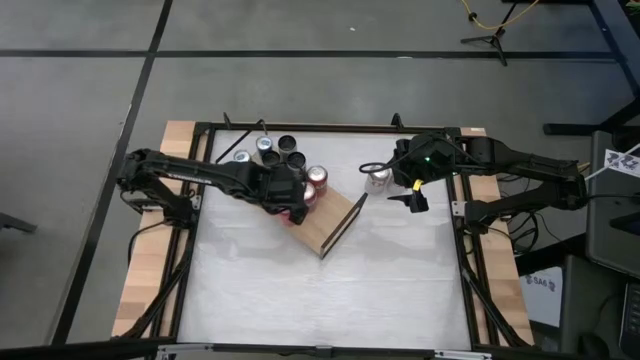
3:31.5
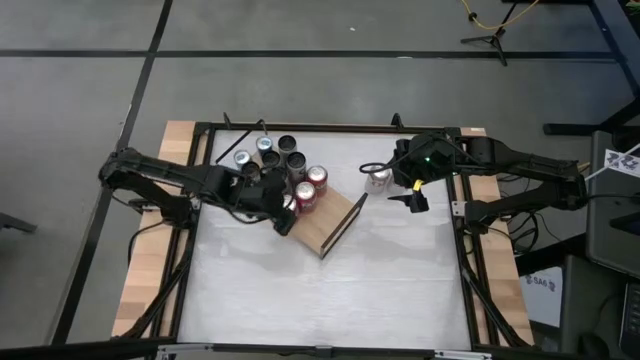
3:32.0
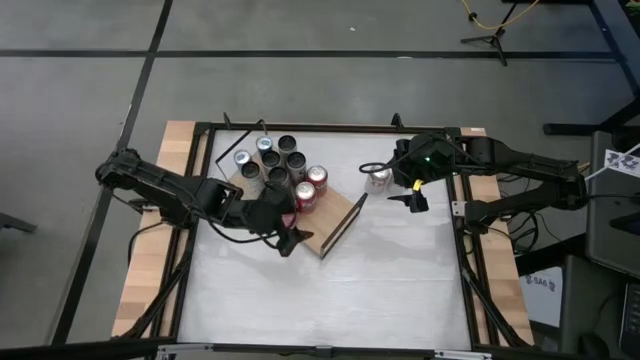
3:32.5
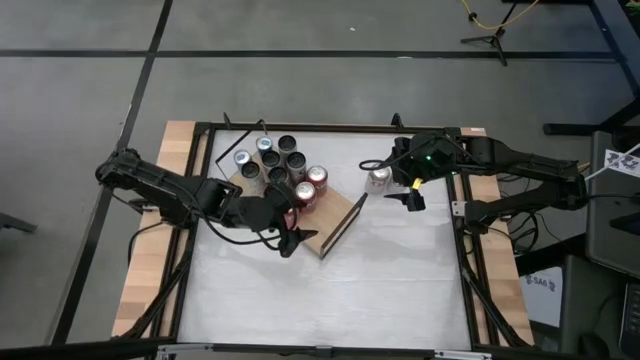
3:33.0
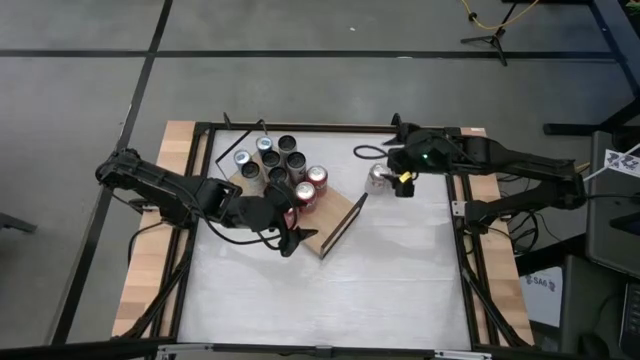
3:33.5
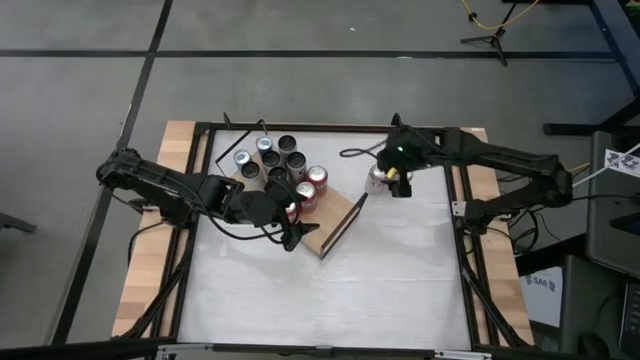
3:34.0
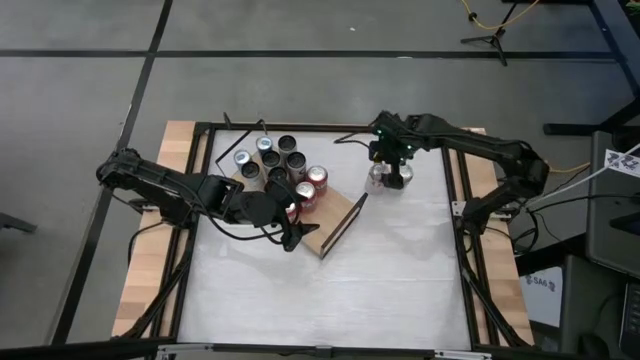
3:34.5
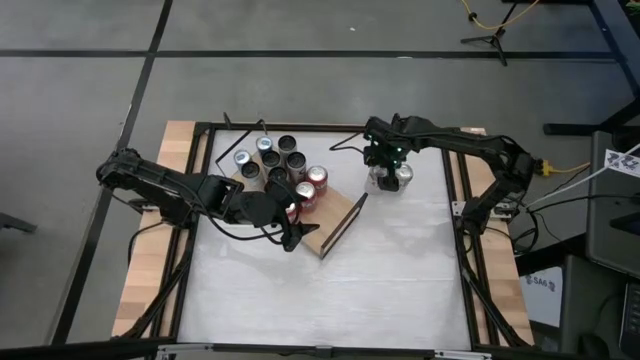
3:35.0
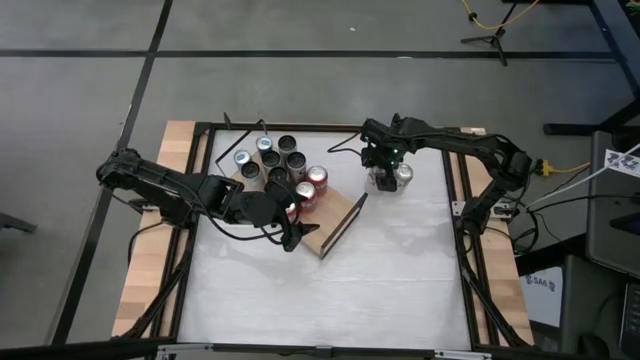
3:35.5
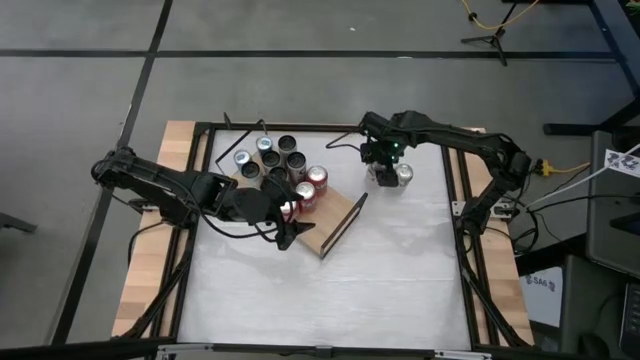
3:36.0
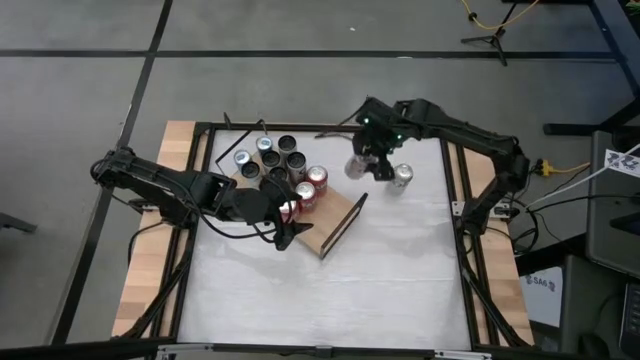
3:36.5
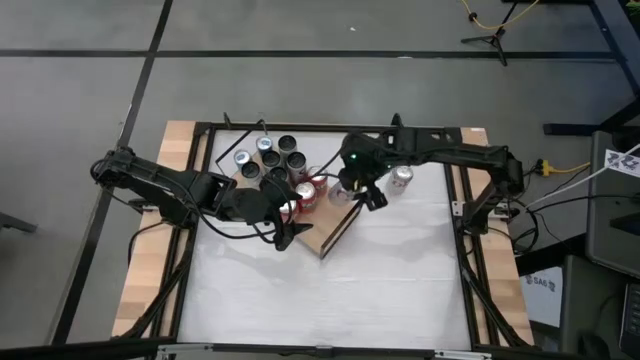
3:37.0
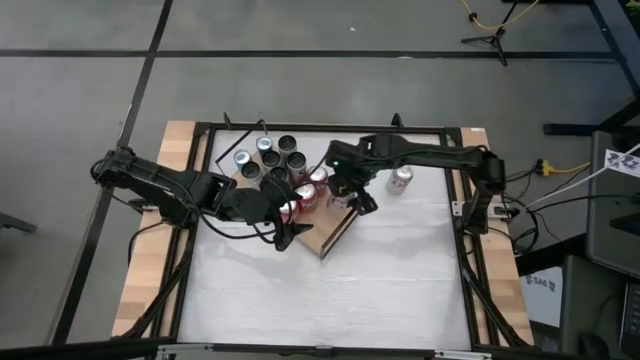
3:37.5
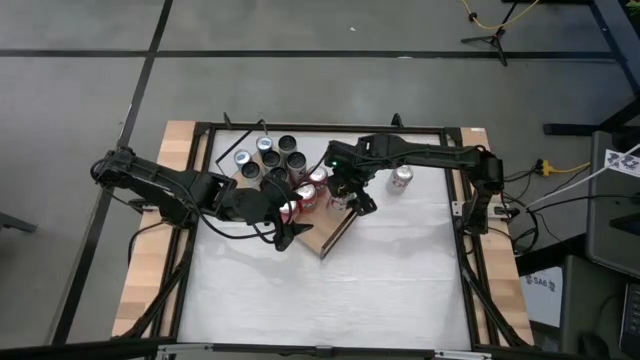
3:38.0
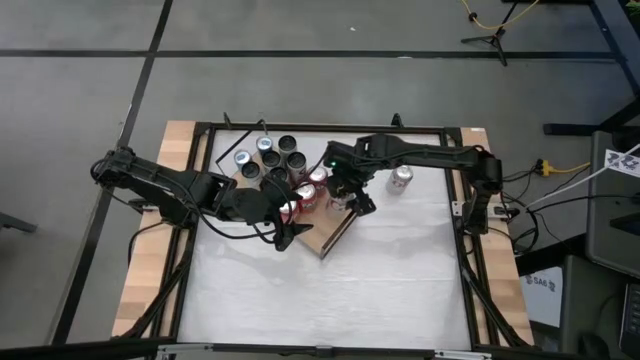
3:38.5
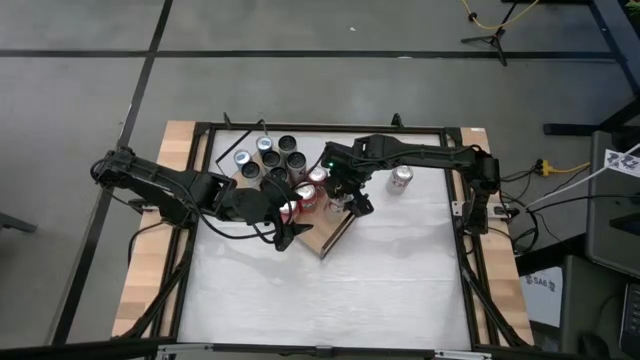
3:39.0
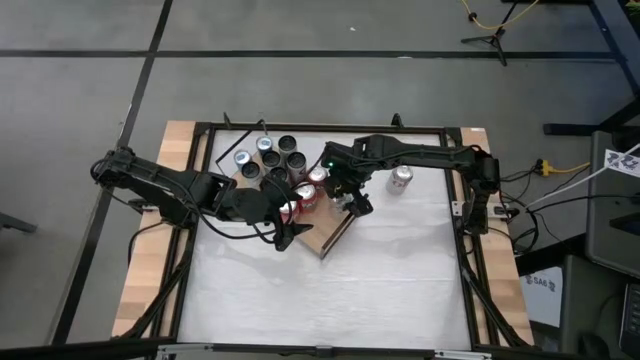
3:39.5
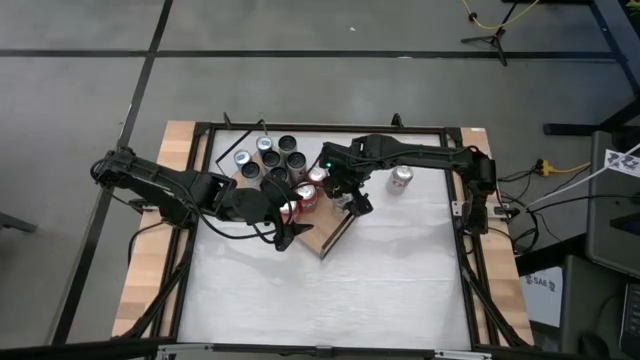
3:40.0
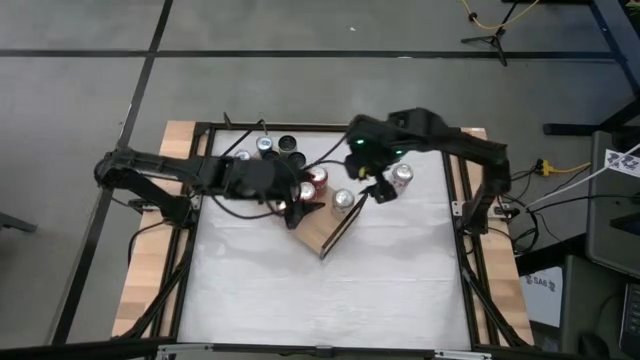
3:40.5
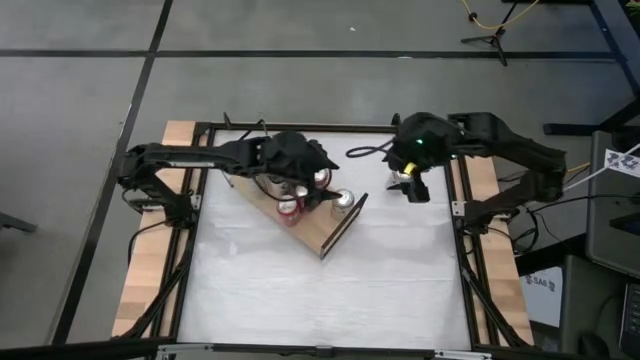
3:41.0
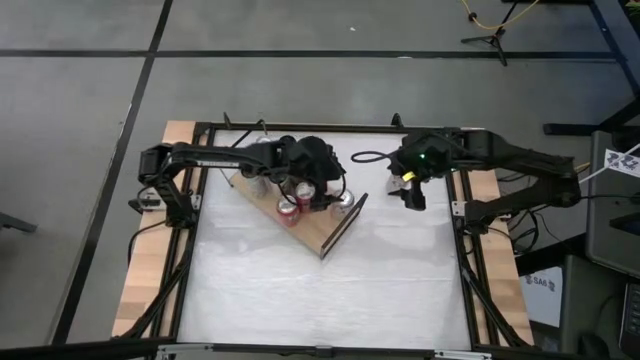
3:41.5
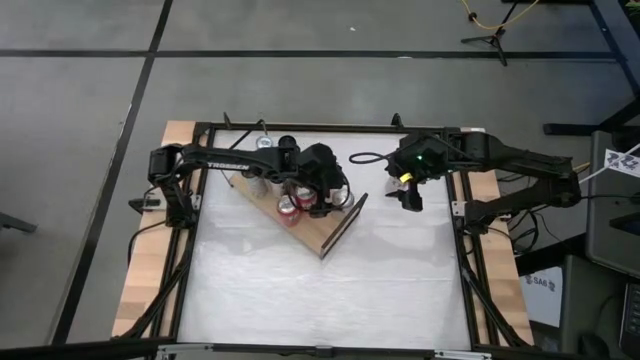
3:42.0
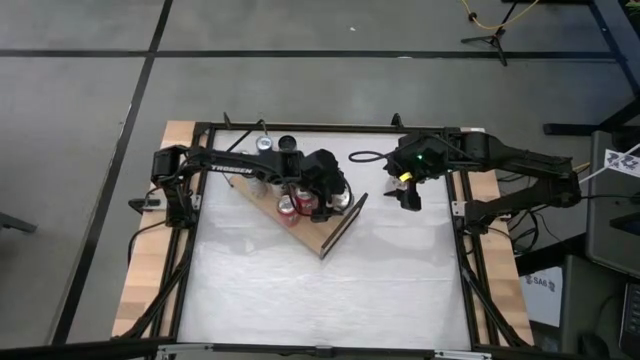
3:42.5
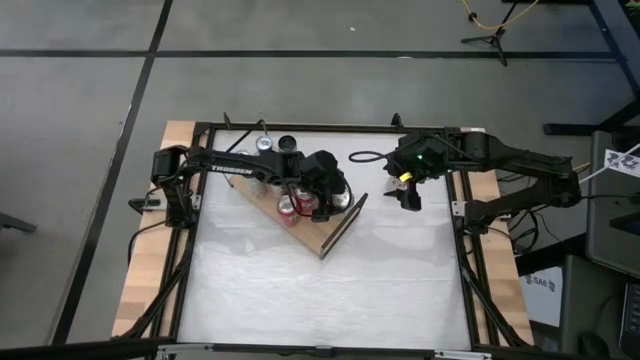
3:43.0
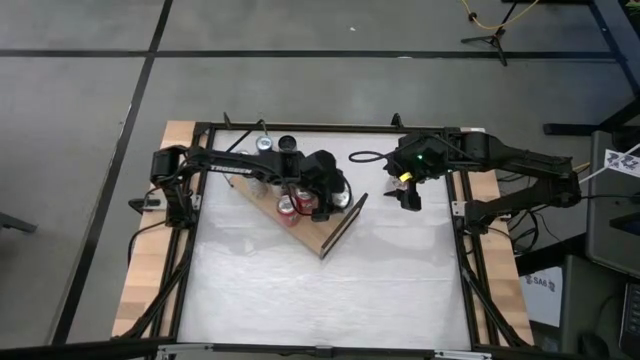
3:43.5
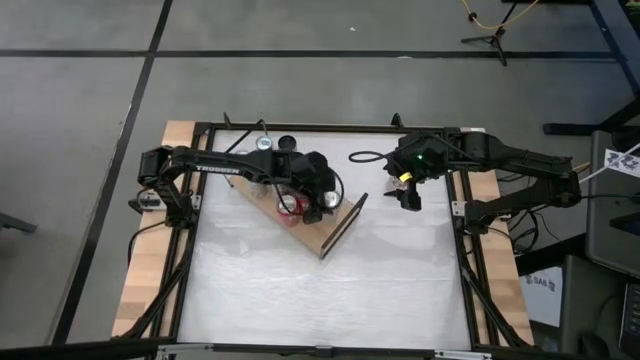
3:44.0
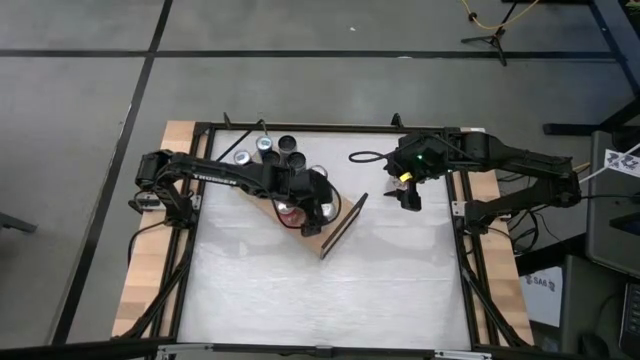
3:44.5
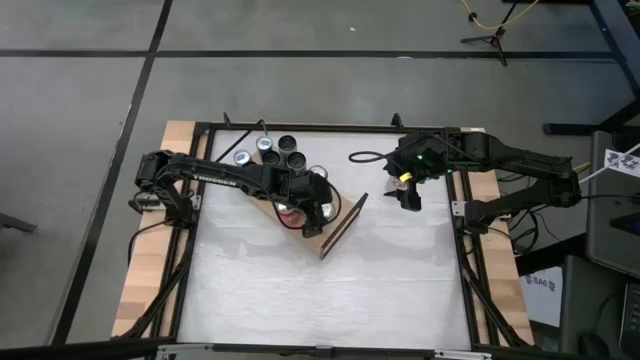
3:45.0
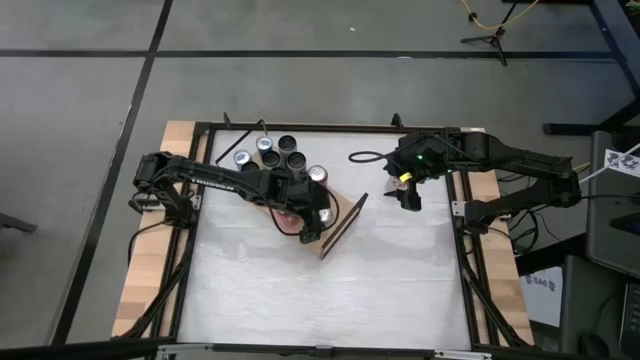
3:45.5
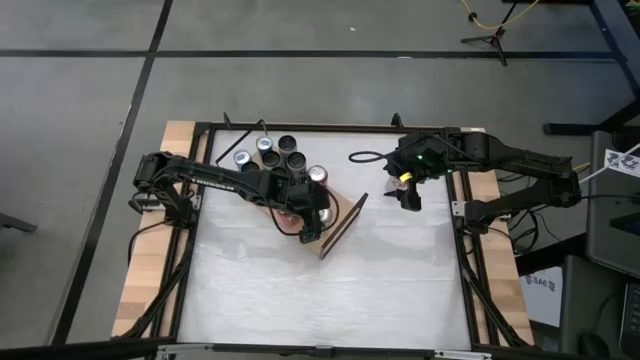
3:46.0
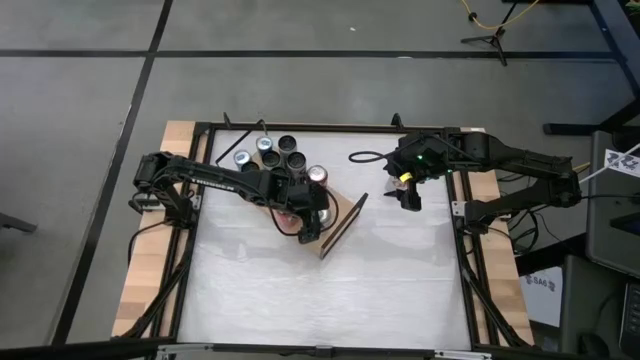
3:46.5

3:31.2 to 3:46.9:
Task: Place canned beverage on shelf
Put the left red-silver soda can on the shelf

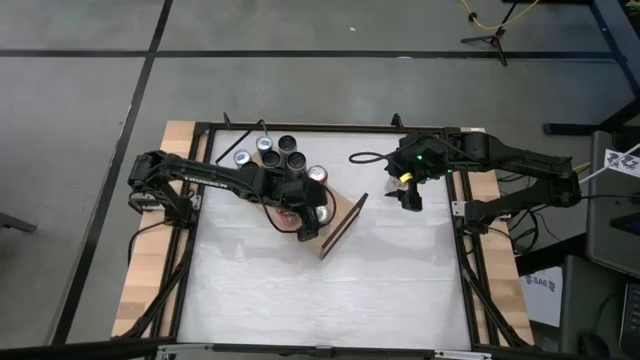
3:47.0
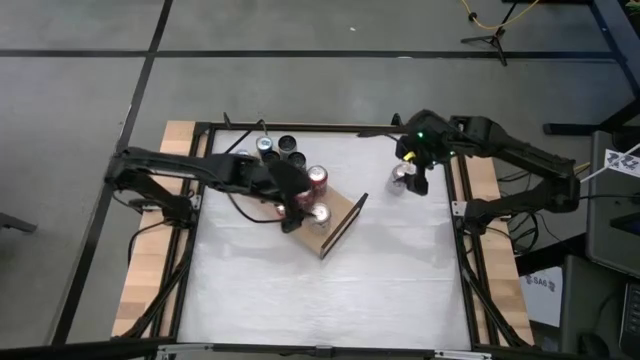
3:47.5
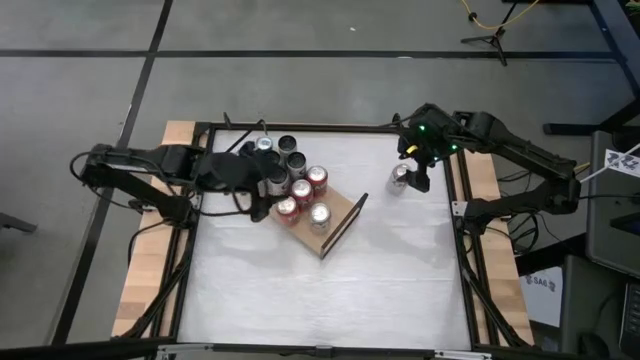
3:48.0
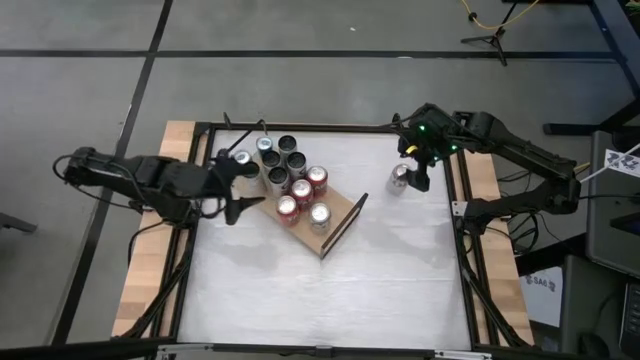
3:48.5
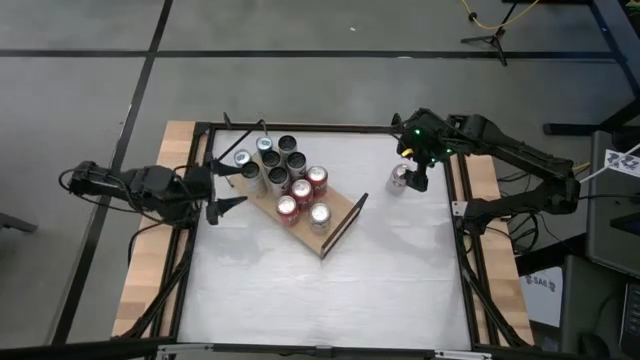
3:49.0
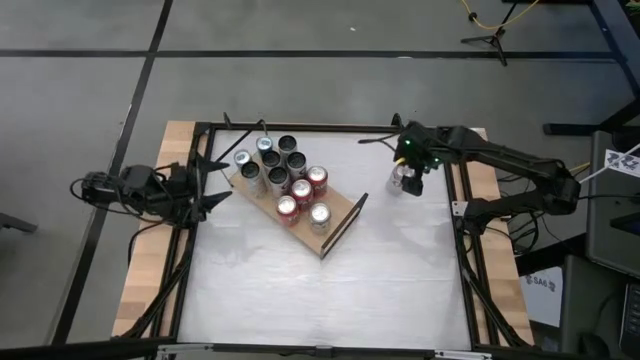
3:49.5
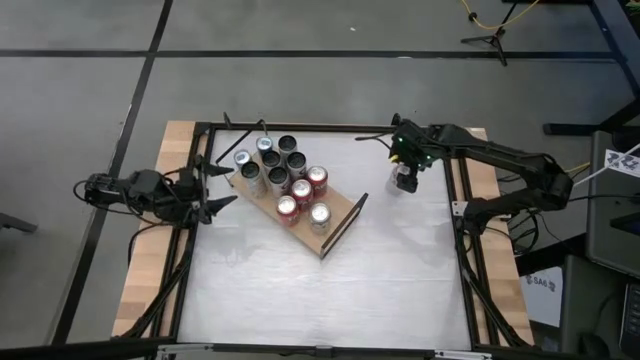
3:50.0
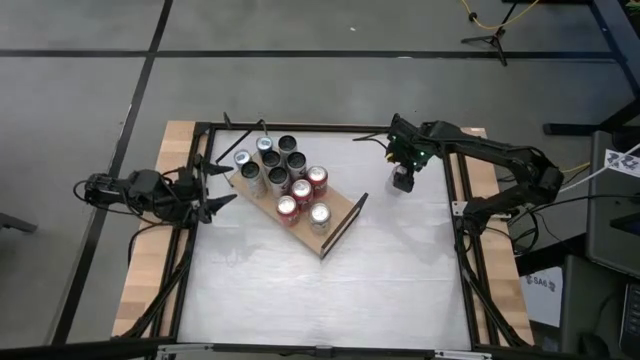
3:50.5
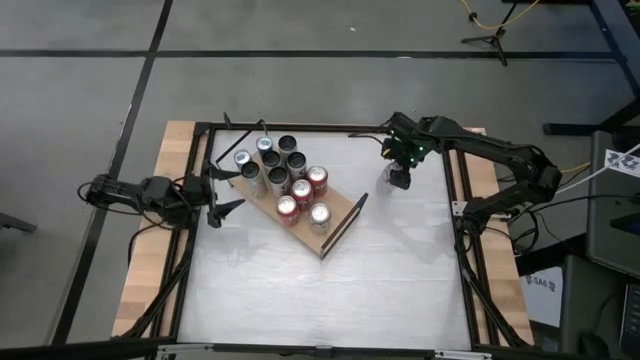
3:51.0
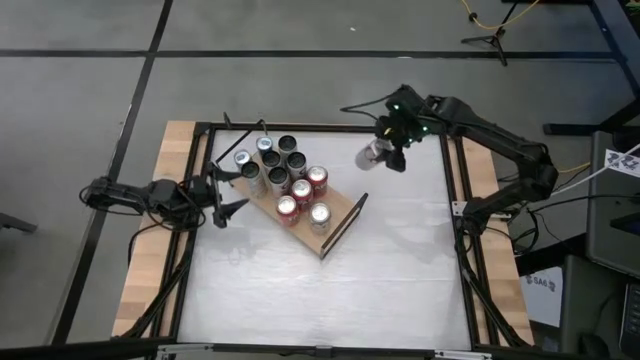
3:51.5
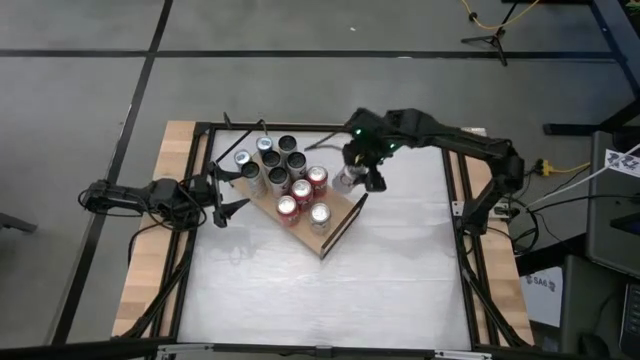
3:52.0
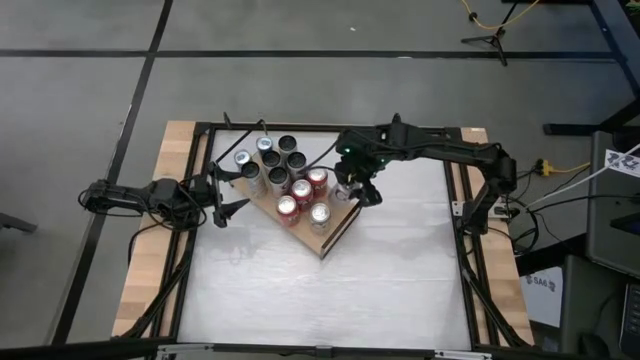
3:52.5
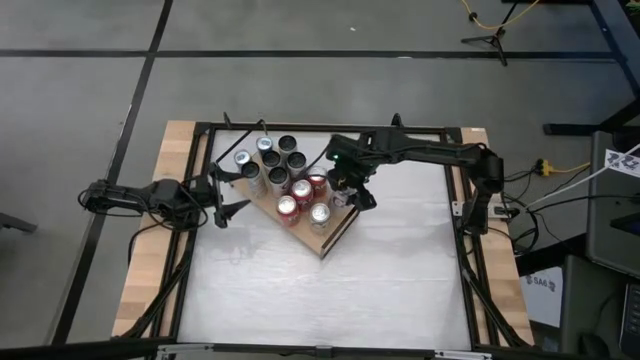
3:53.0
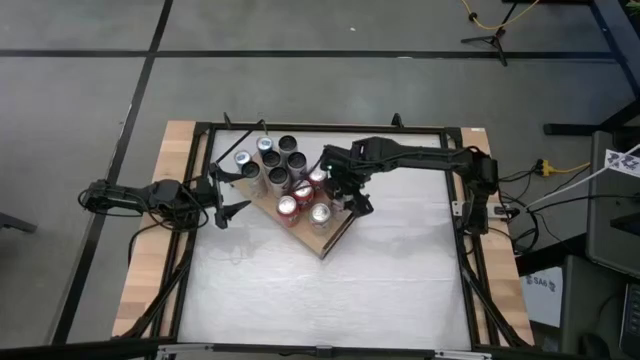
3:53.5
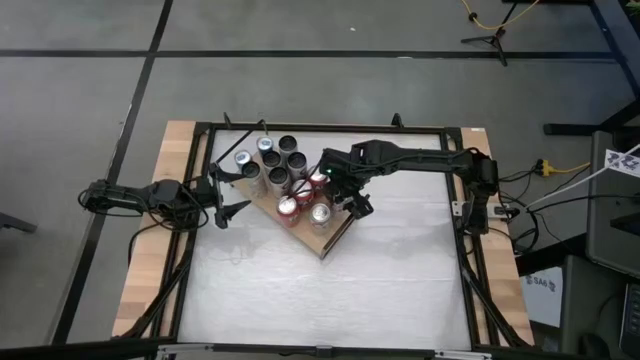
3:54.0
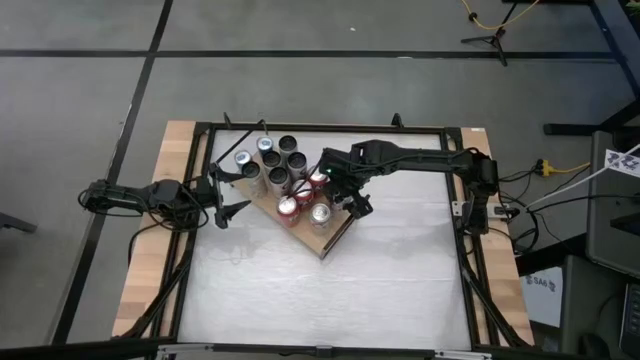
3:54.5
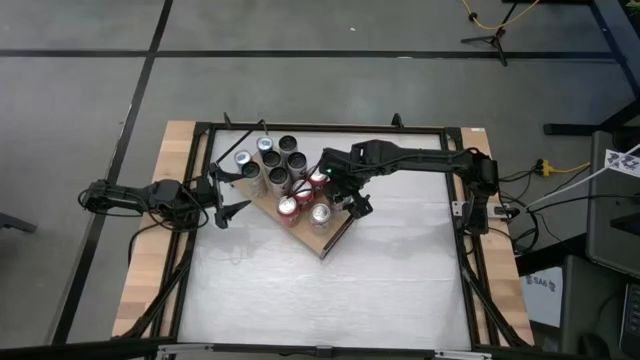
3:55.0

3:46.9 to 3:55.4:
Put the red-silver soda can aligned with the red-silver soda can on the shelf
